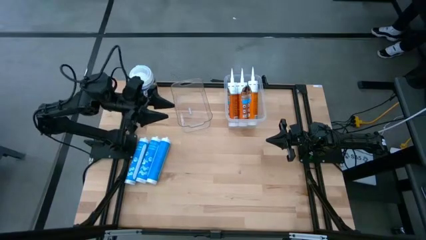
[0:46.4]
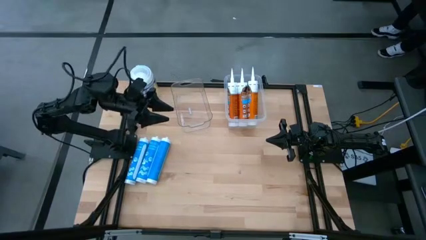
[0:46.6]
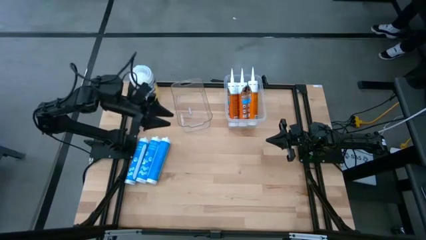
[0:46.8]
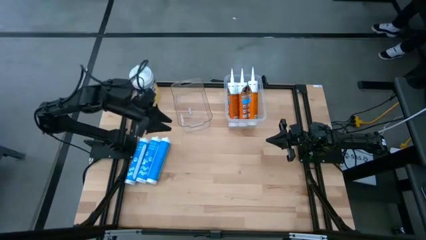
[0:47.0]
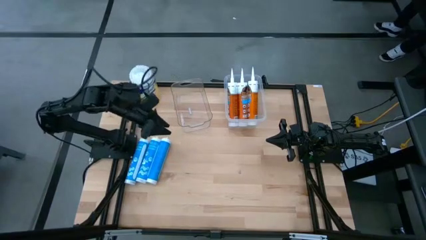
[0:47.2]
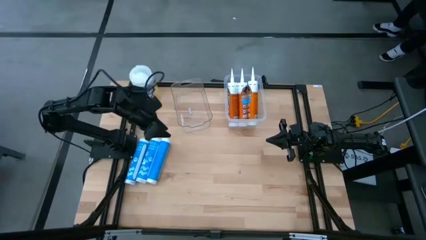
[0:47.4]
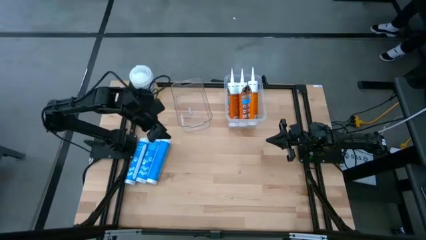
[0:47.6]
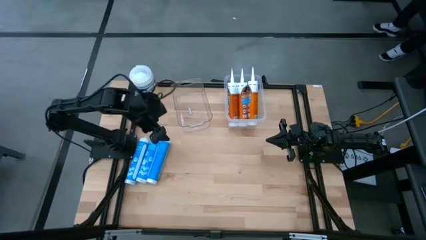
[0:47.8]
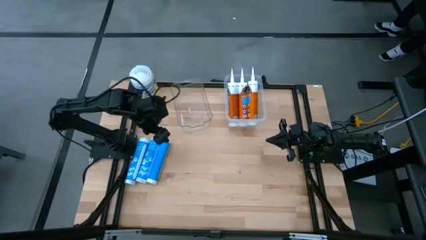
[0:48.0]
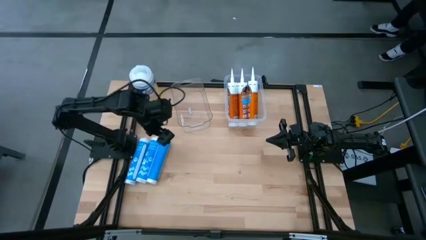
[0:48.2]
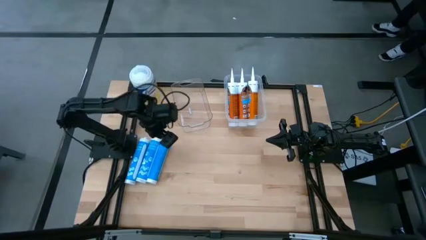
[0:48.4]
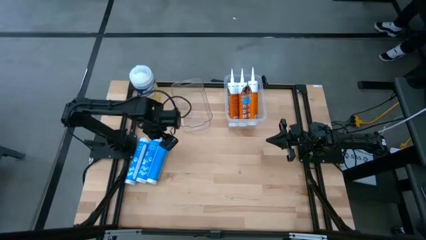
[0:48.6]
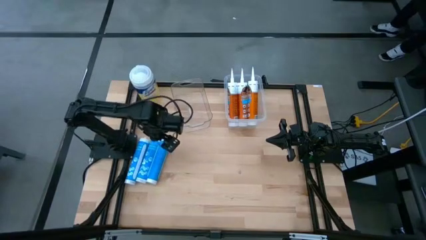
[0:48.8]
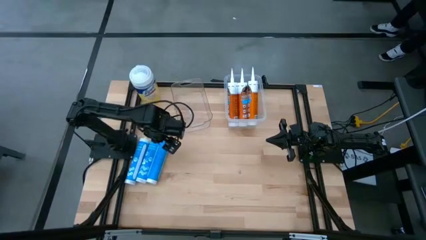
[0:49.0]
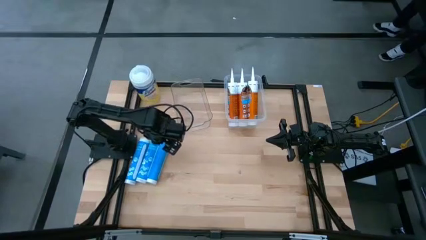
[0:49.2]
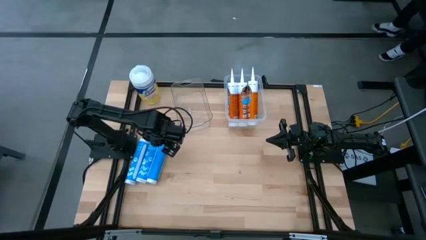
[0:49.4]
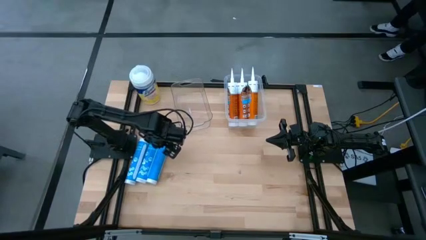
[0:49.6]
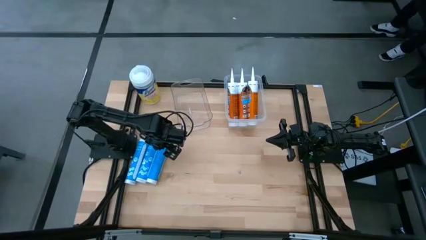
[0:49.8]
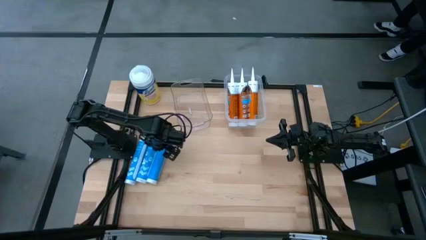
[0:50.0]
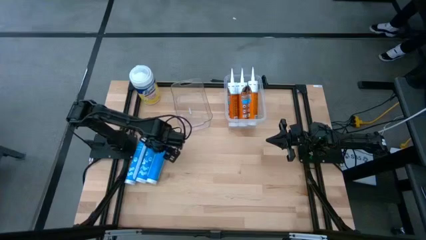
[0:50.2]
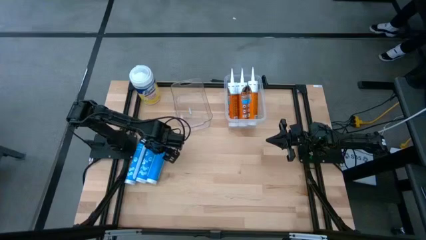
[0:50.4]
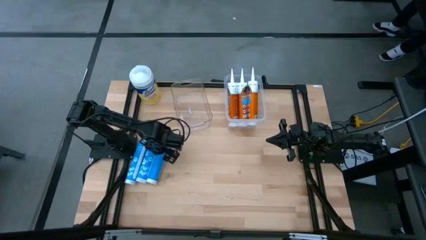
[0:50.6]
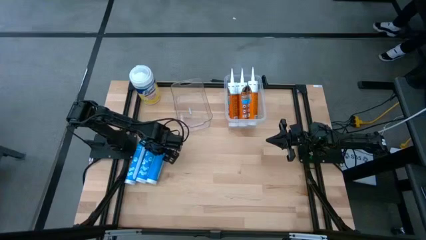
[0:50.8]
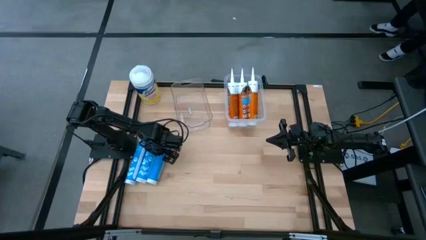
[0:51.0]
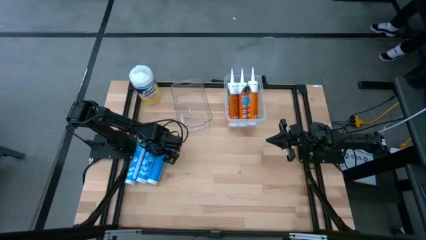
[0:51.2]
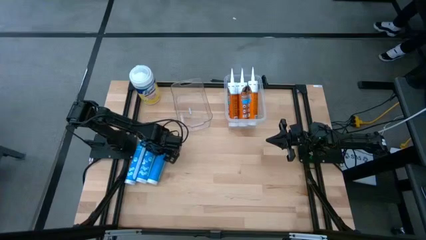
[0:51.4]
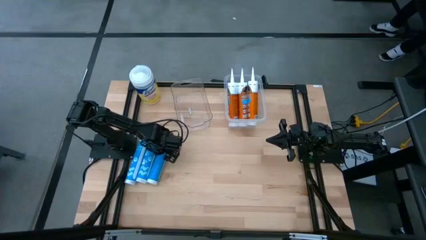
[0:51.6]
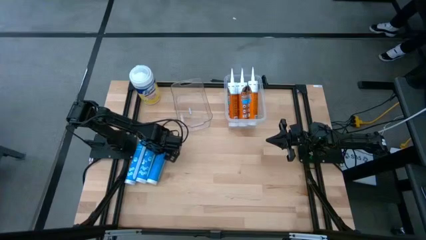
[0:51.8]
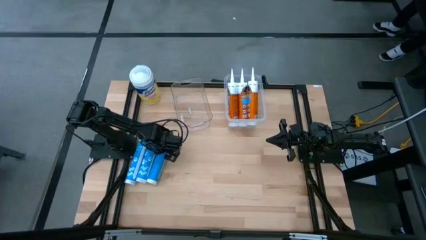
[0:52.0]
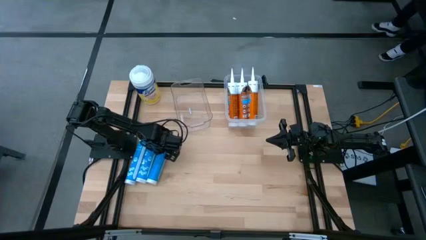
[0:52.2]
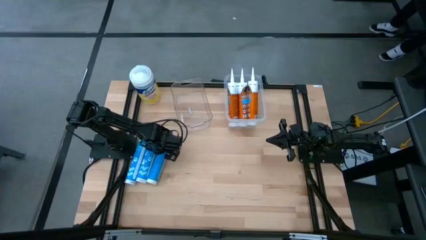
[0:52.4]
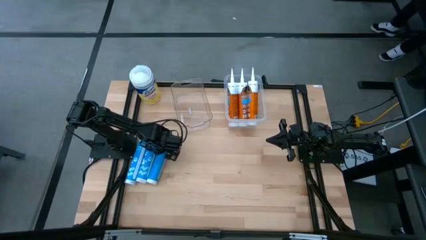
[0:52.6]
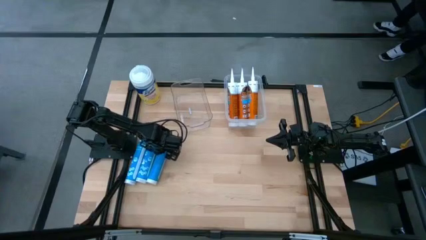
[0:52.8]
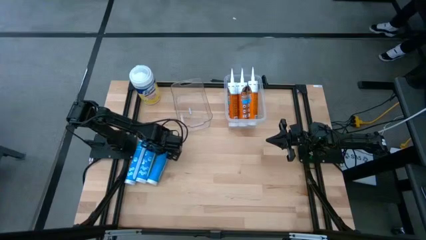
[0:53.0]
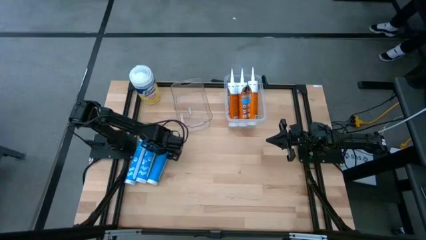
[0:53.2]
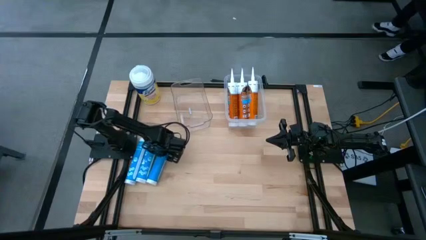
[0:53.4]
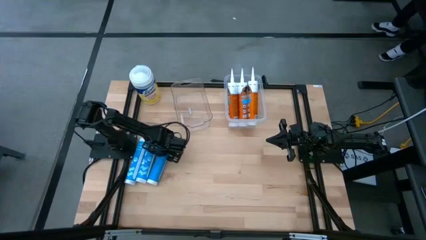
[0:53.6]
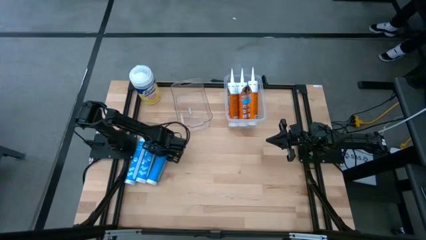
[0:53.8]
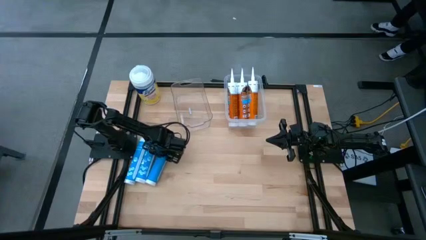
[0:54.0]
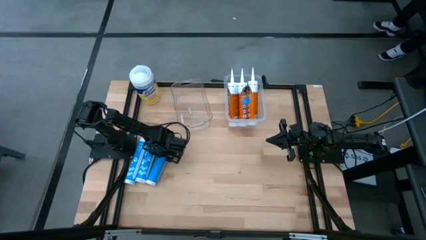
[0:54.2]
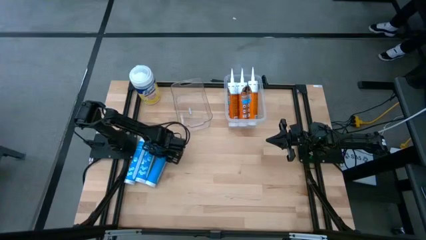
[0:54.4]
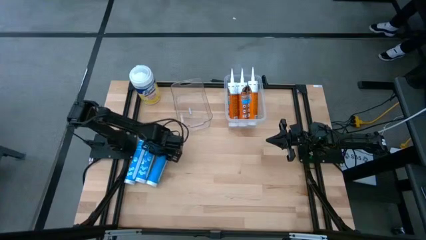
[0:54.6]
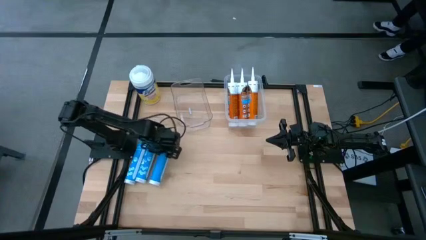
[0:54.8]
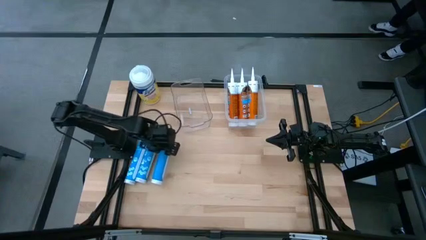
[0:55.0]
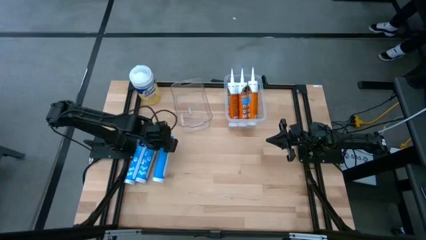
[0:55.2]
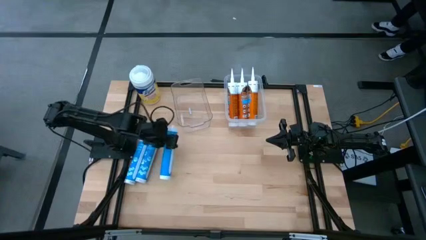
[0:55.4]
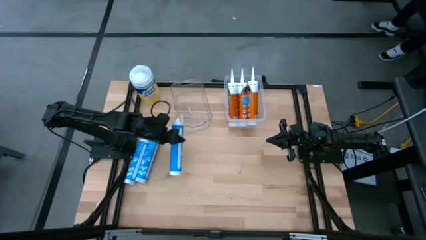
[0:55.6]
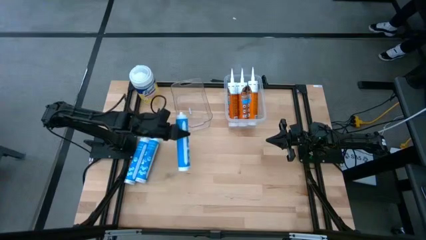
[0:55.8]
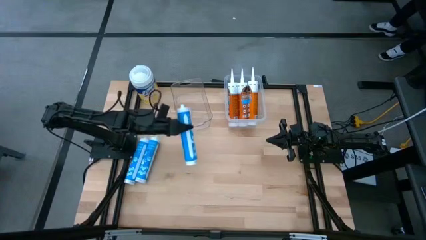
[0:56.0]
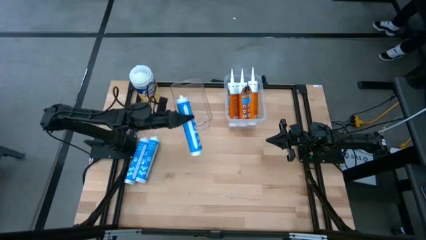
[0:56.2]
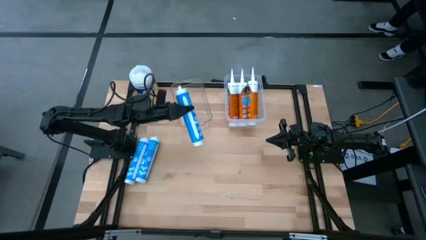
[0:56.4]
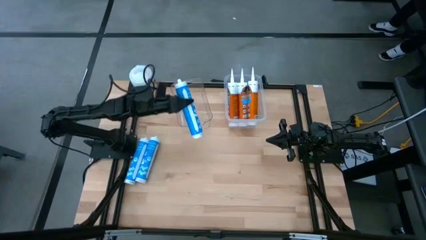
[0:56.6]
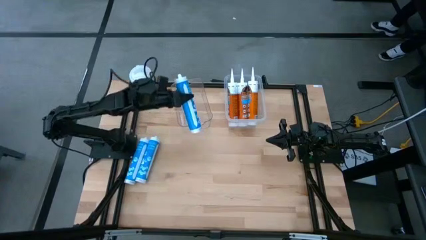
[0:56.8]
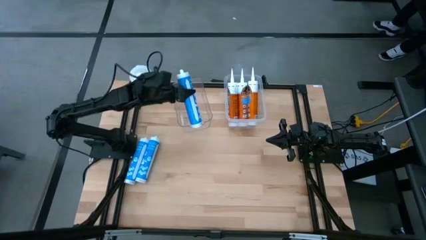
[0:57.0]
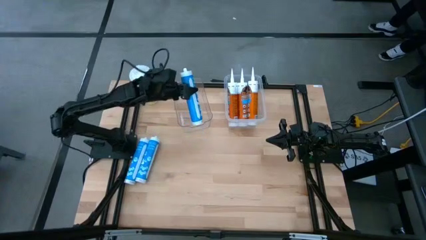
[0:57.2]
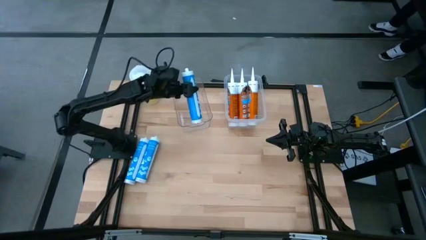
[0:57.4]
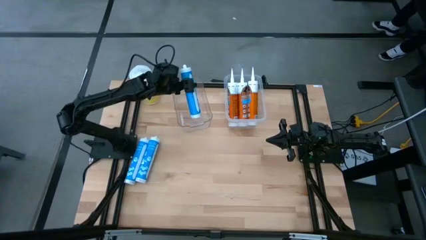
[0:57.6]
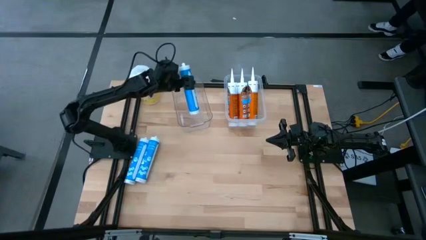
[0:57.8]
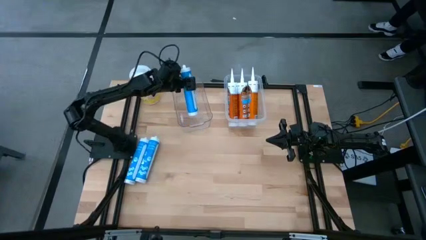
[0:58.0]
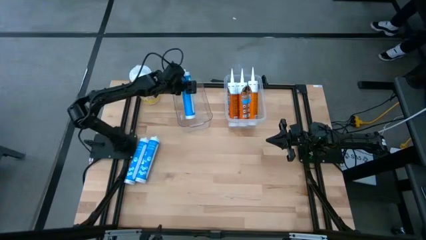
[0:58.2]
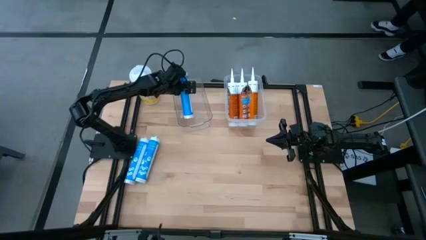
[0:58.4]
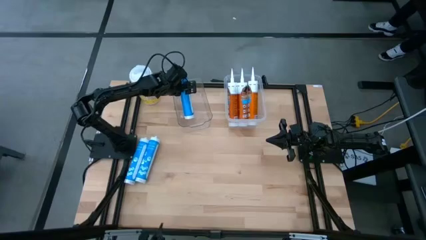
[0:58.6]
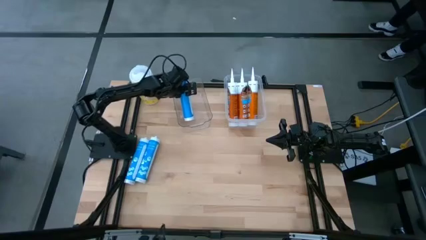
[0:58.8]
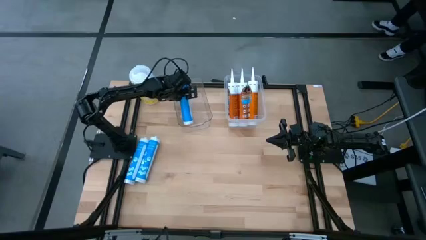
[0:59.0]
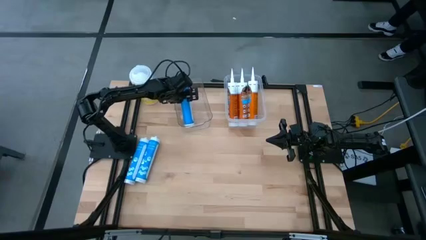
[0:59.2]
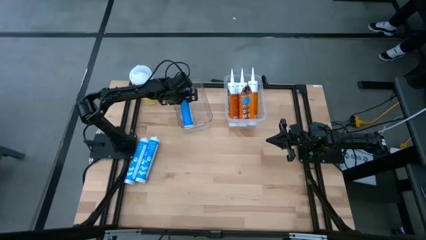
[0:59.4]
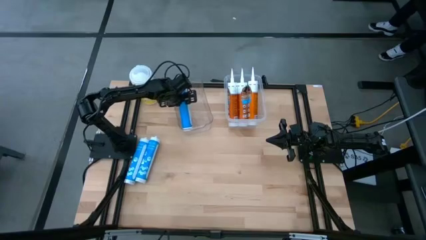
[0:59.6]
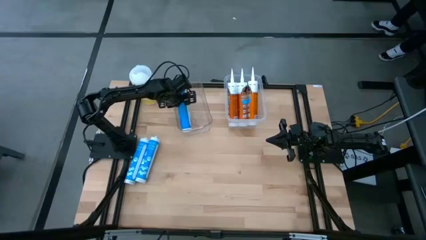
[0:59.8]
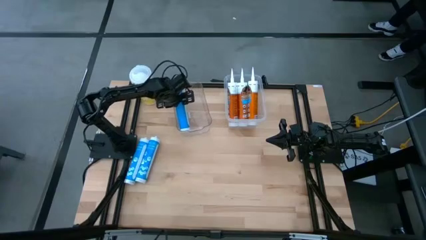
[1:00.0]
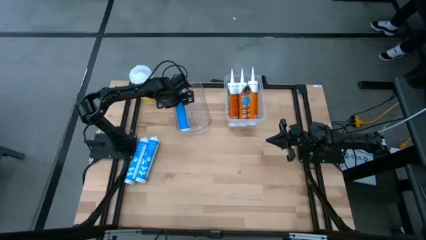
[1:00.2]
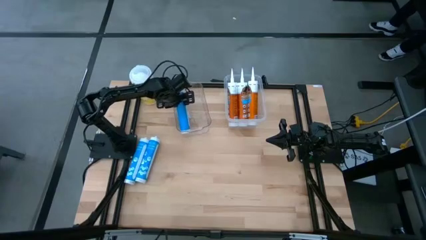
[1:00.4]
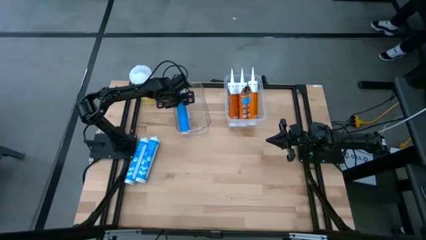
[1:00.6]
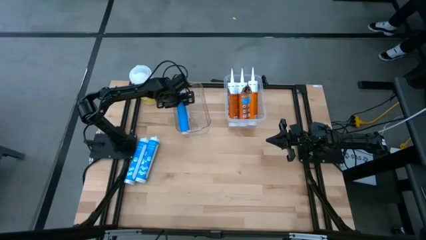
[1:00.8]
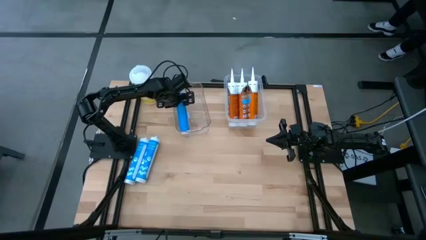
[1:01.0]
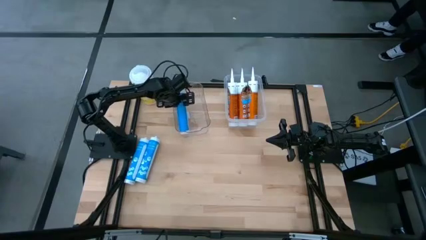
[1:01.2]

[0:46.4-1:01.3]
Task: Pick & place silicon tubes, Sealant and Lysol wipes
Put the left blue sealant into the left transparent bin
